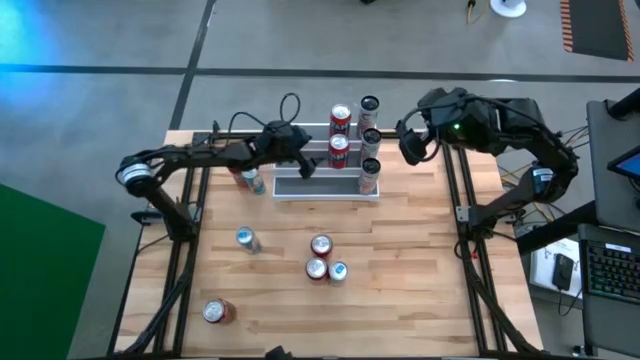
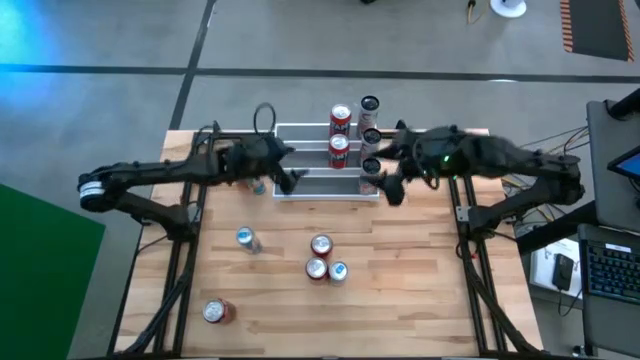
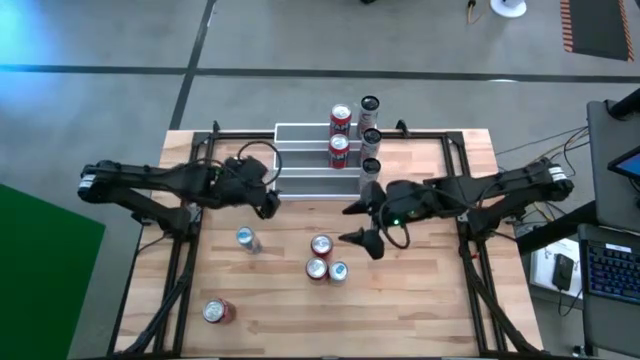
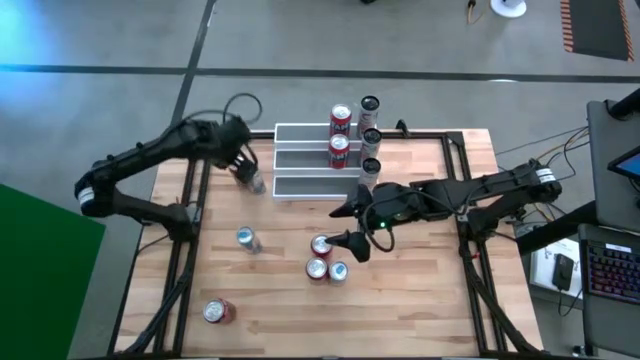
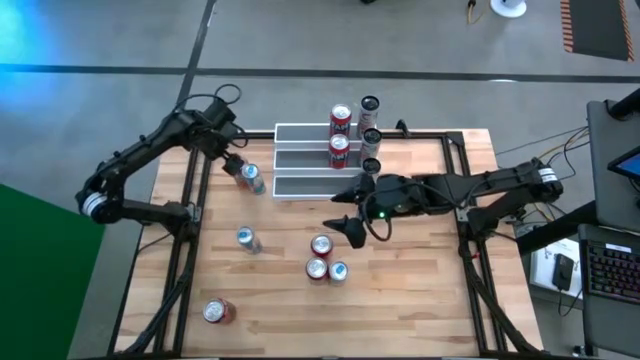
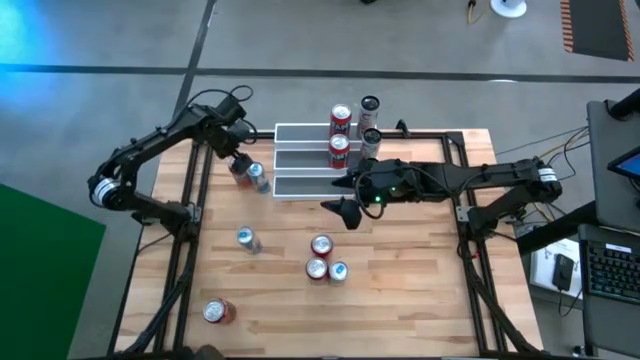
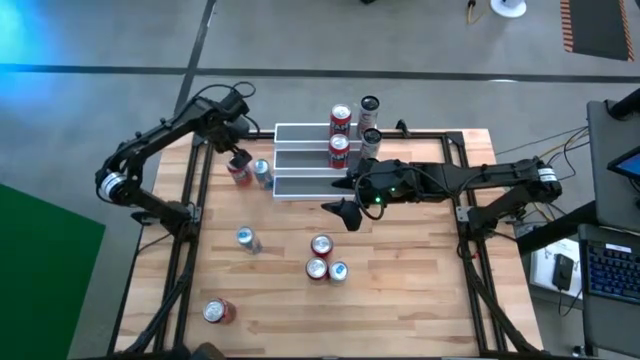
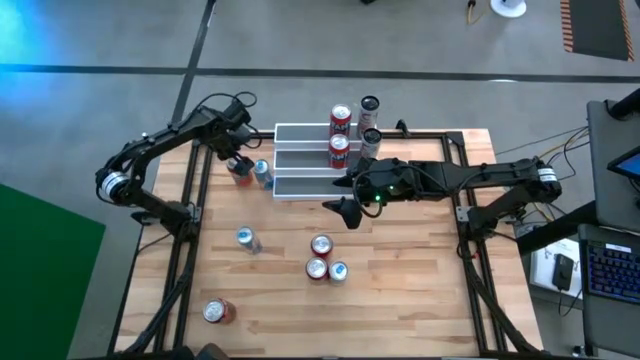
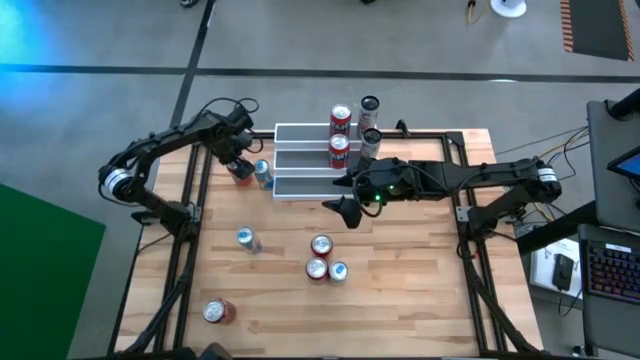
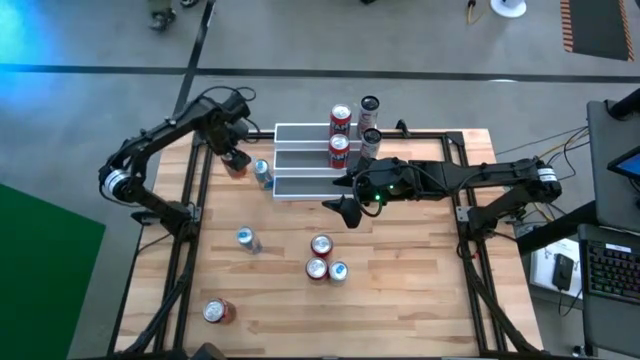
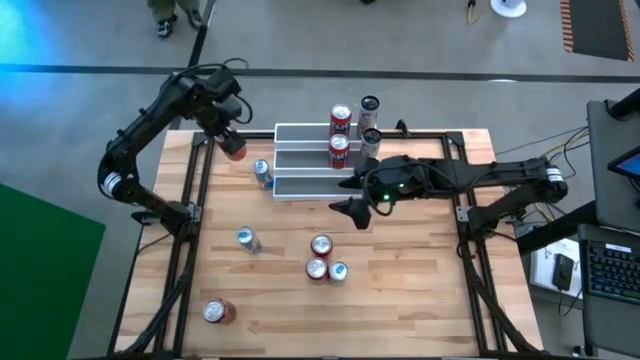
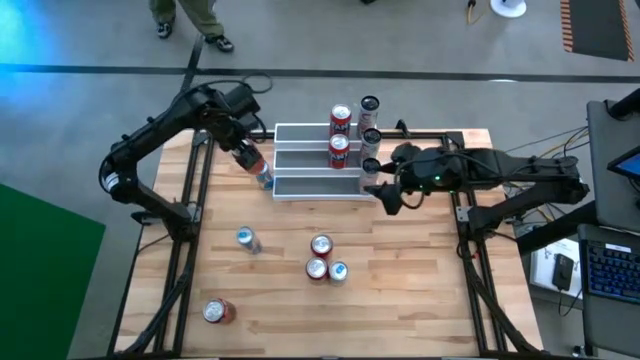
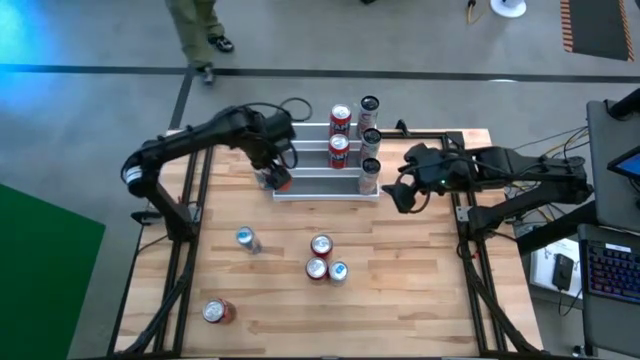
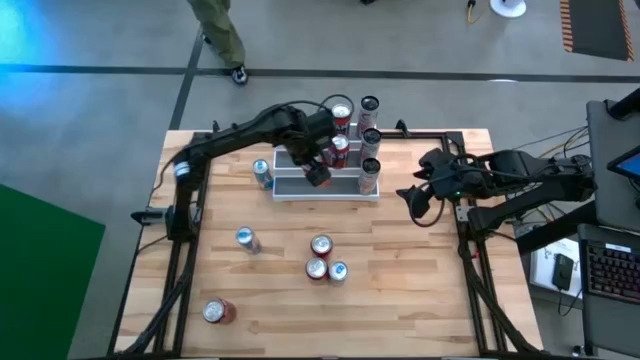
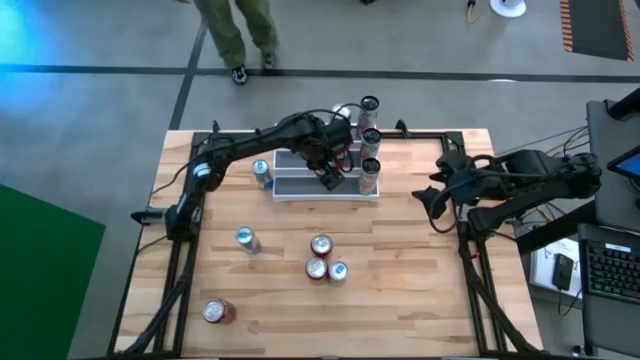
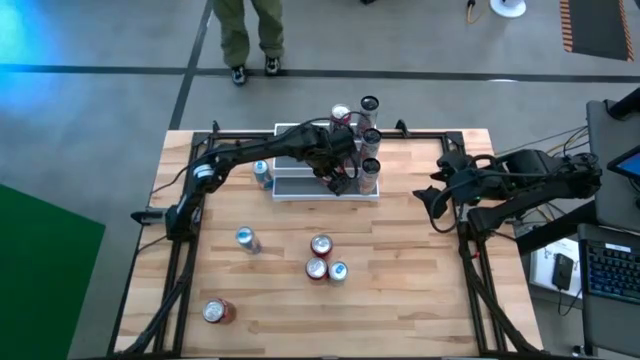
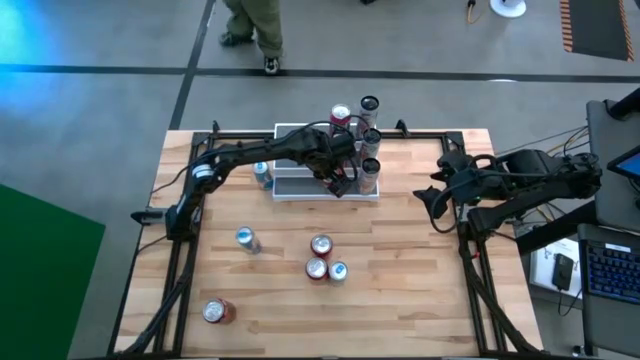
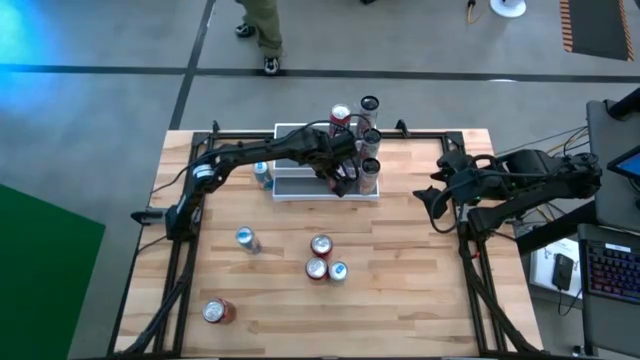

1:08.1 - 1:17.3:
Task: Place canned beverage on shelf
Put the orange soda can on the bottom tier of the shelf aligned with the other orange soda can

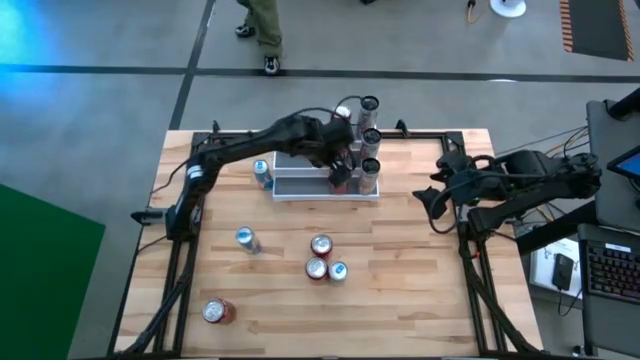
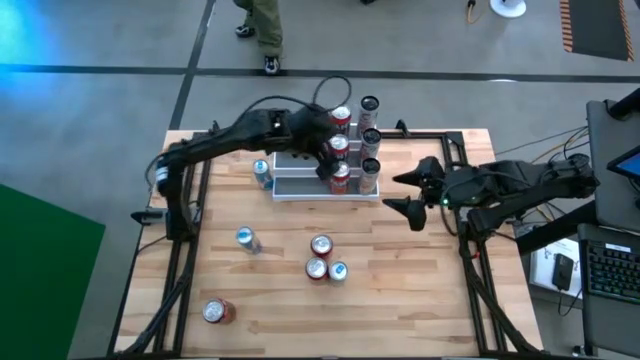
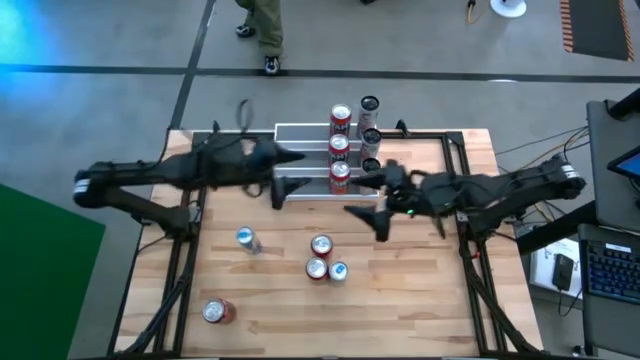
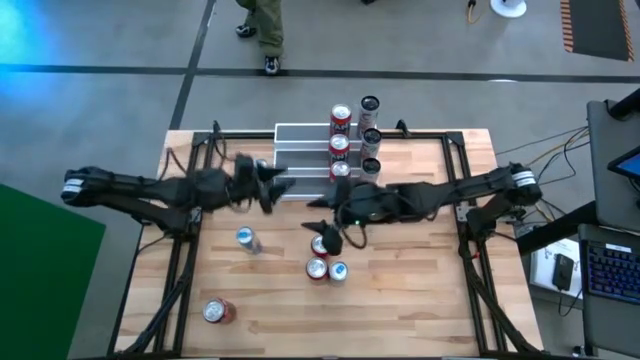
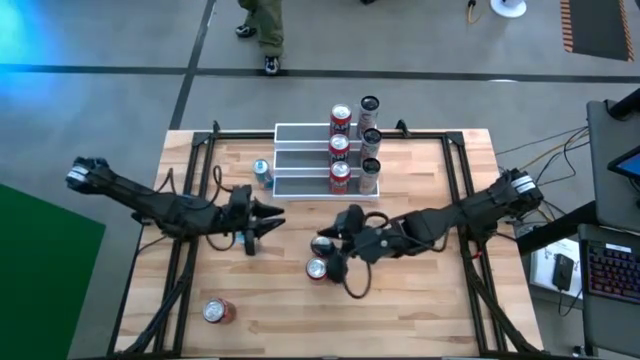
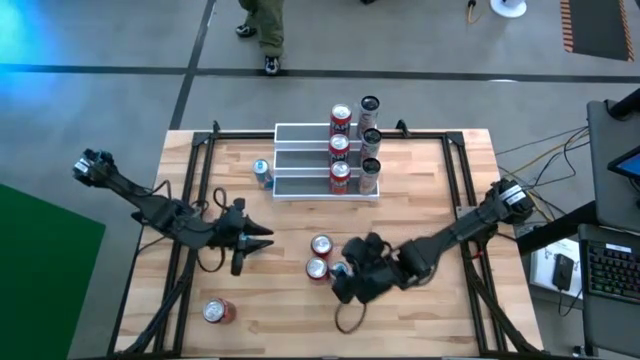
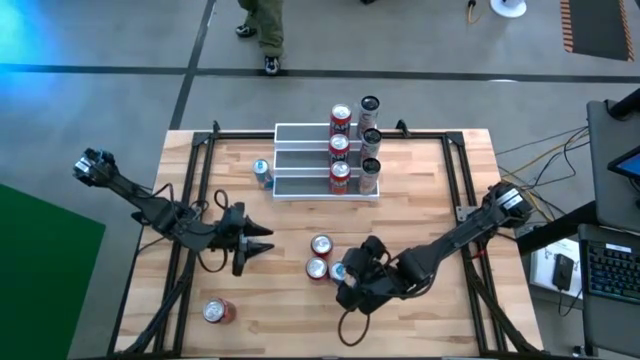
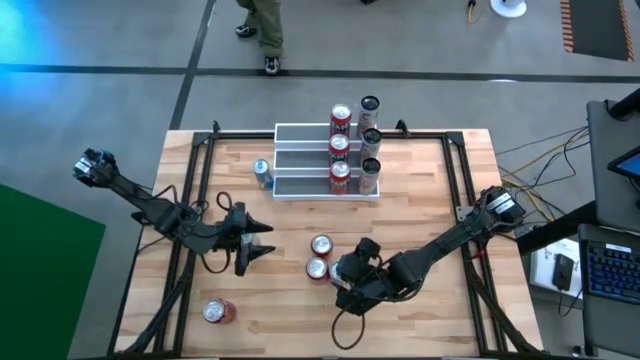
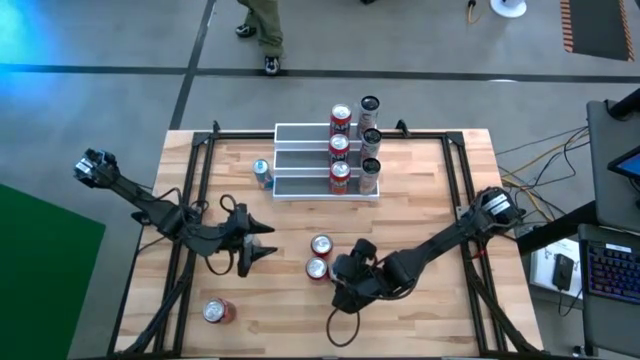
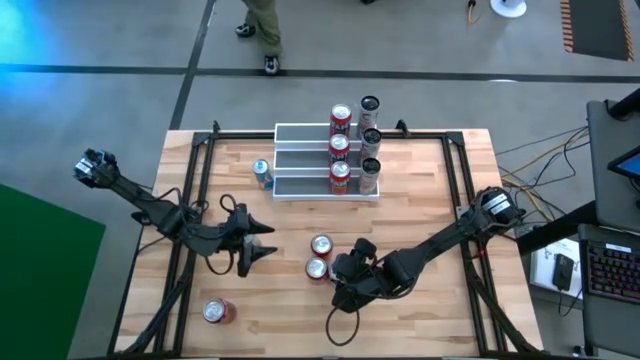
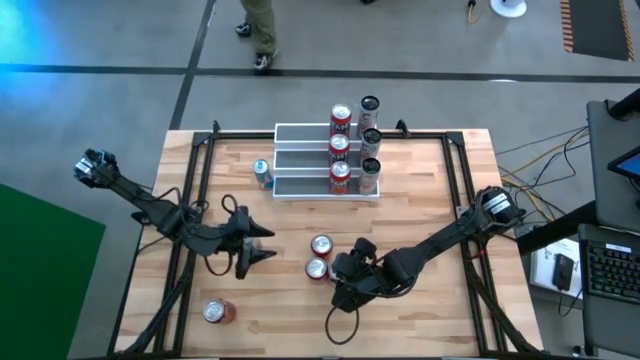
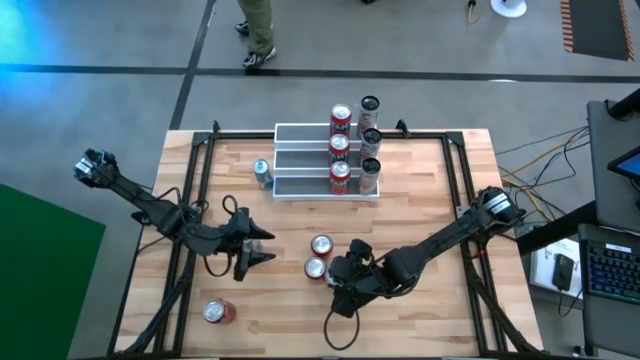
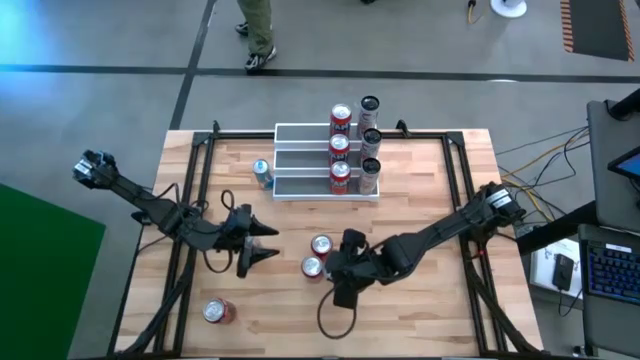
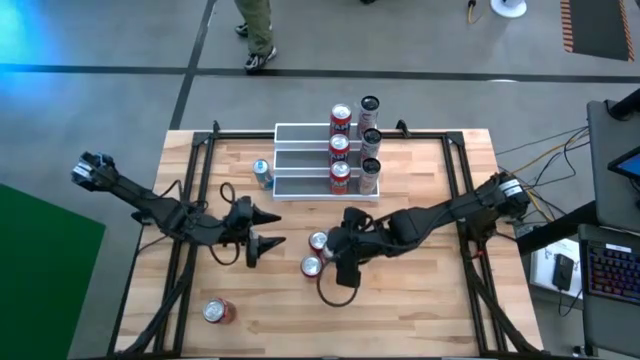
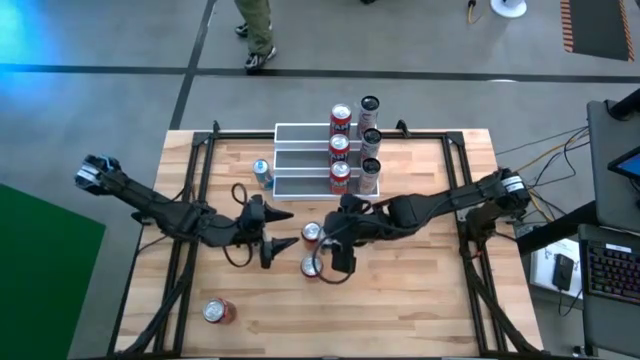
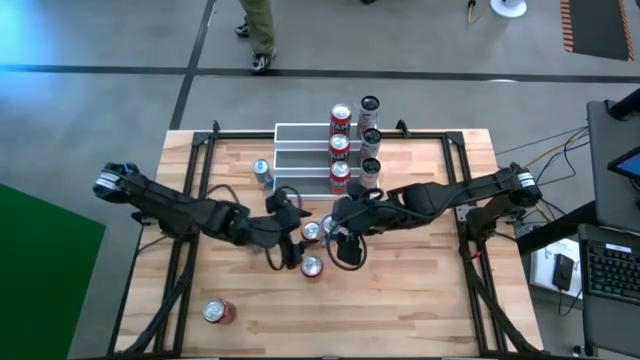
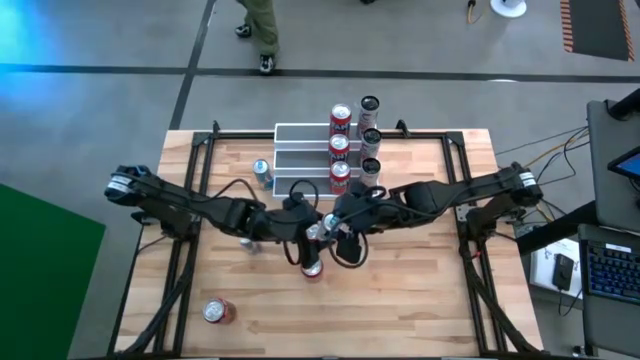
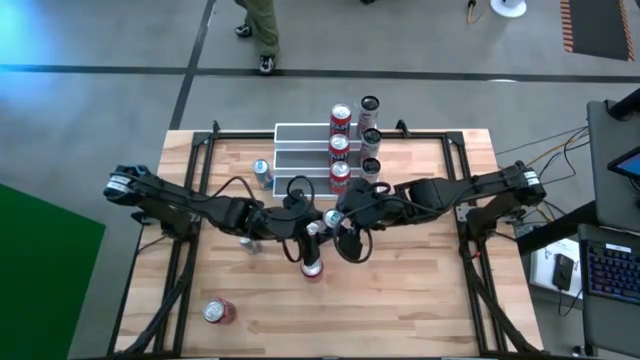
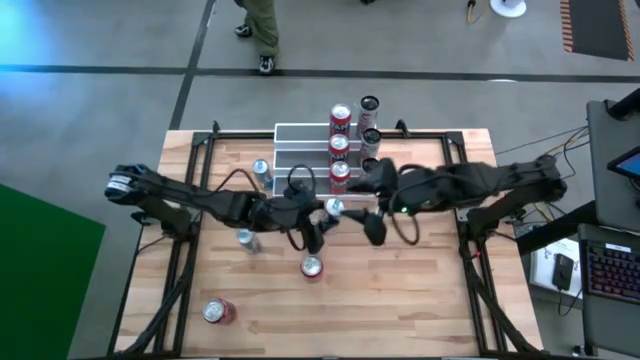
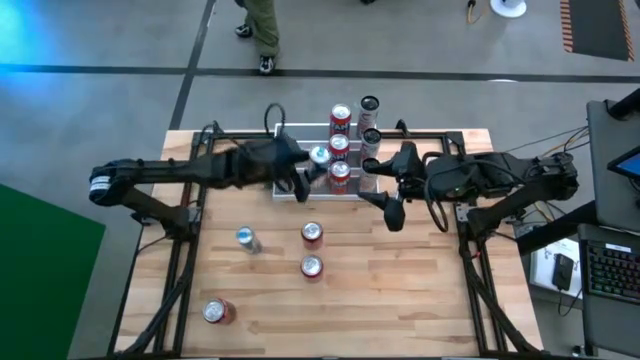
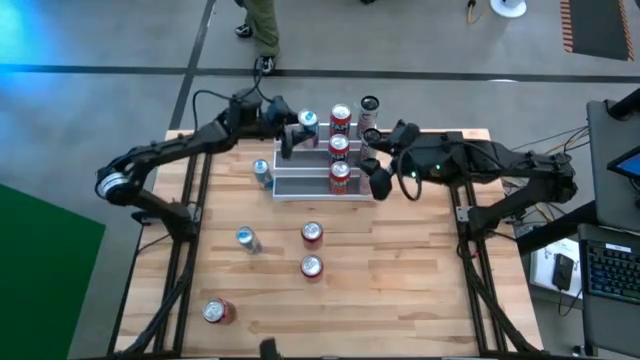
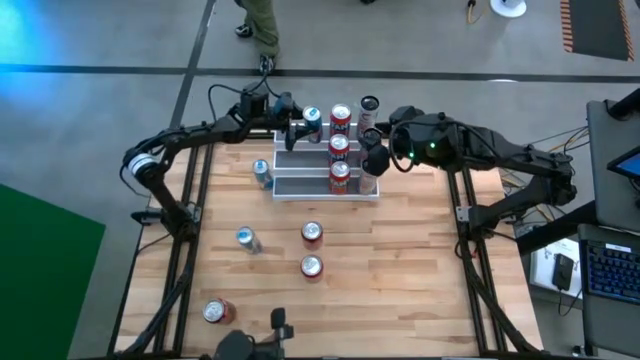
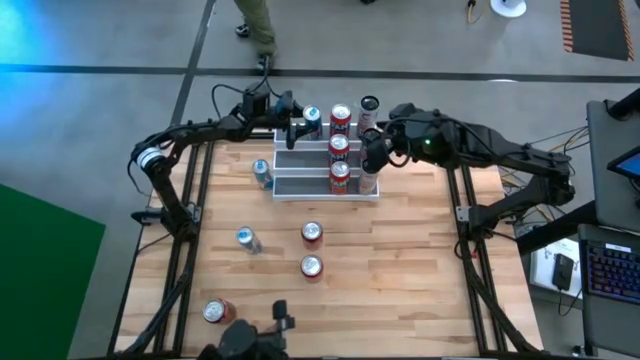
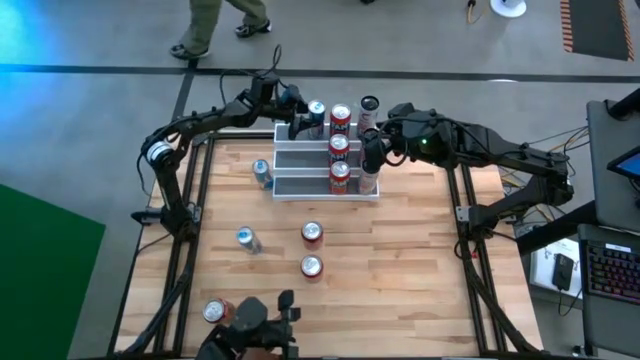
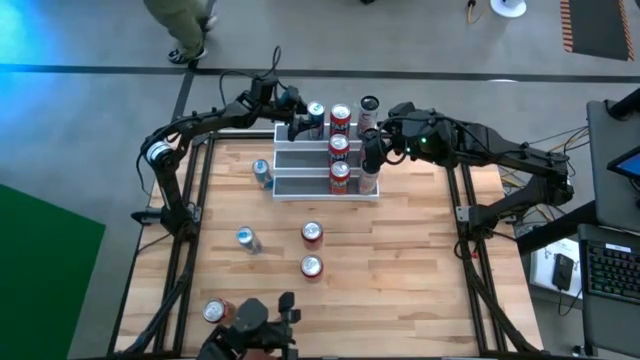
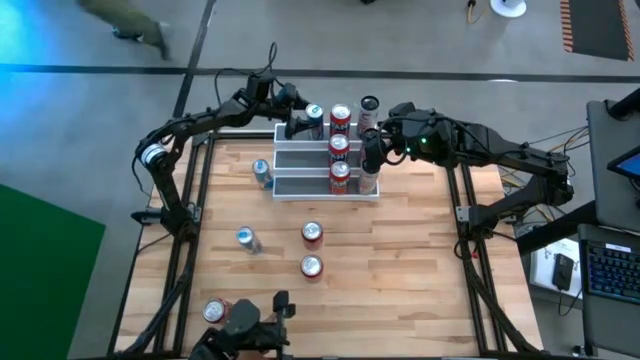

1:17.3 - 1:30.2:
Put the bottom left blue soda can on the top tier of the shelf
